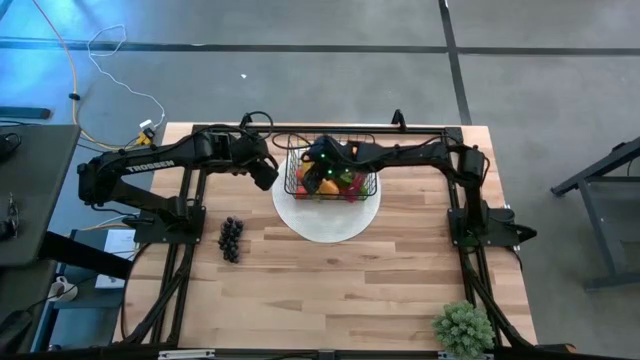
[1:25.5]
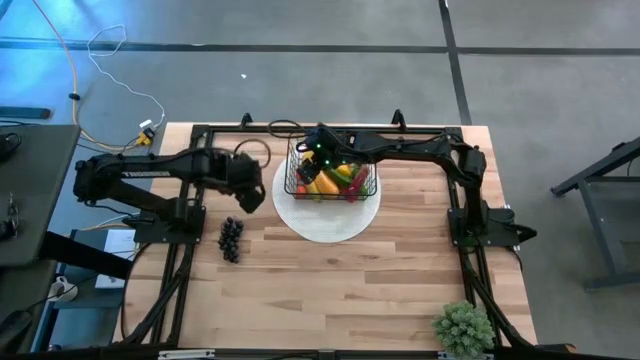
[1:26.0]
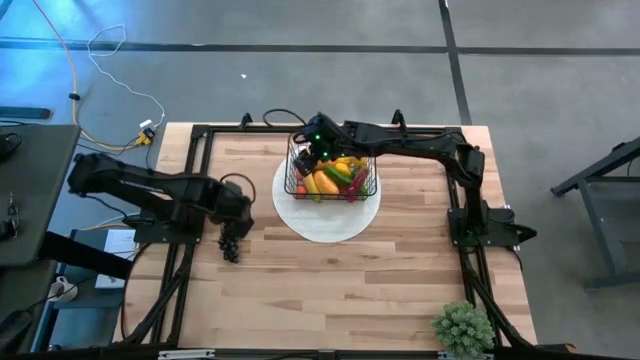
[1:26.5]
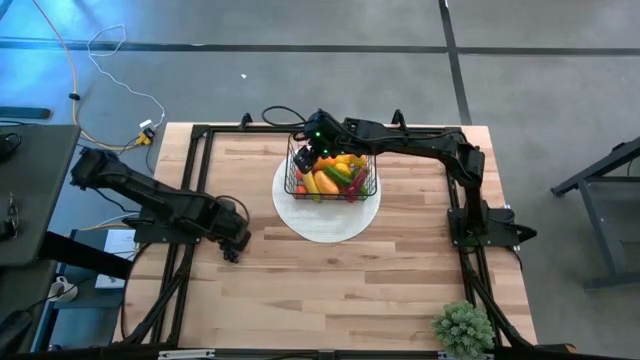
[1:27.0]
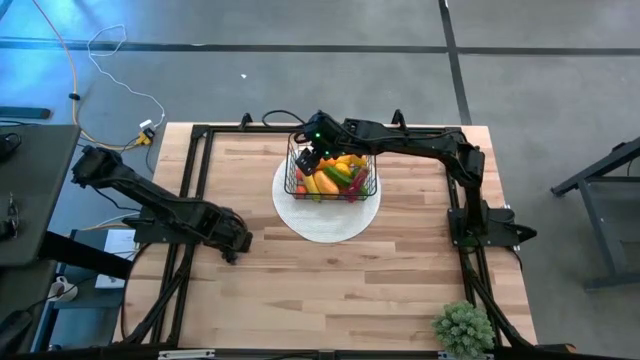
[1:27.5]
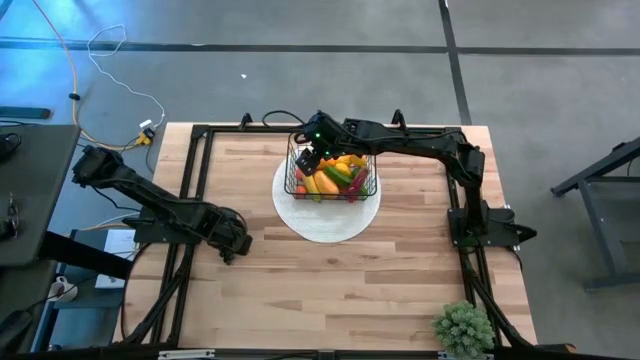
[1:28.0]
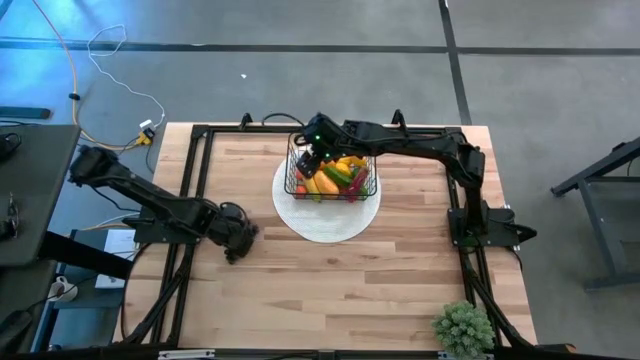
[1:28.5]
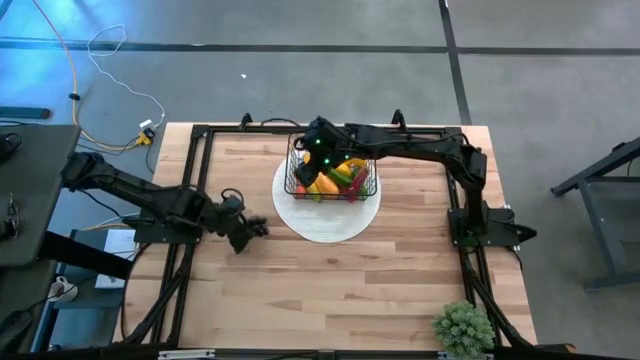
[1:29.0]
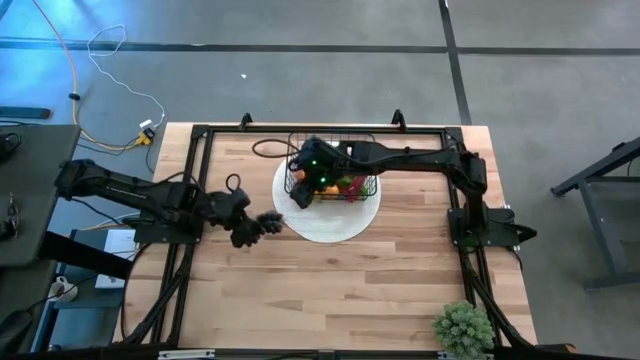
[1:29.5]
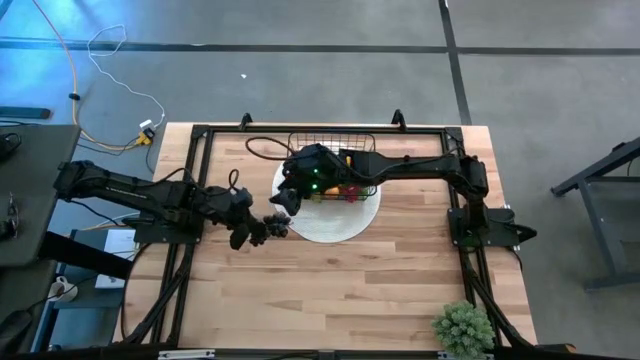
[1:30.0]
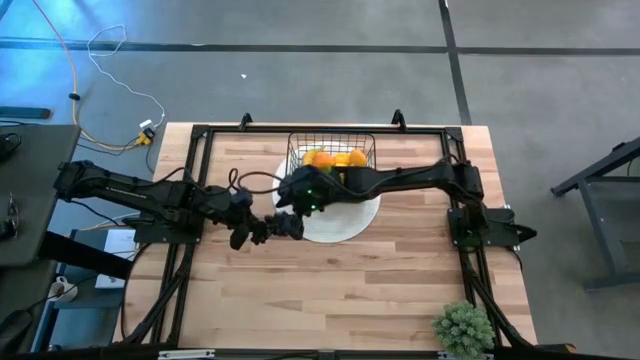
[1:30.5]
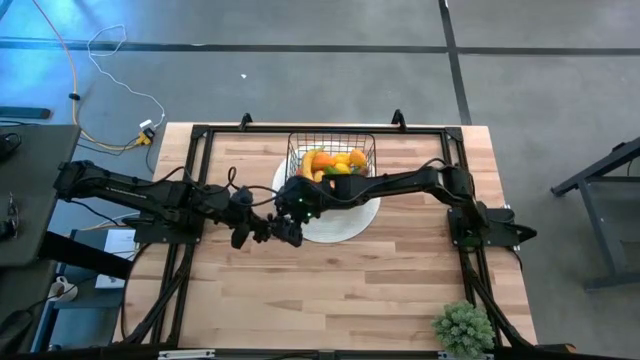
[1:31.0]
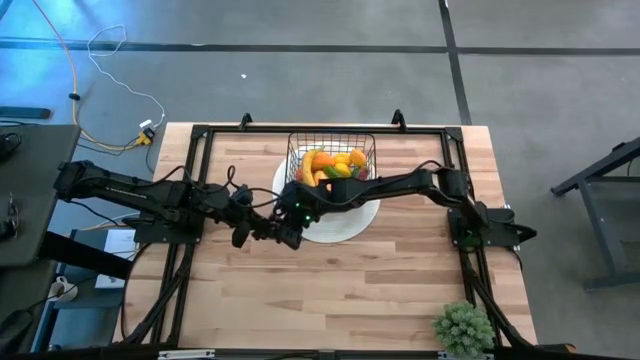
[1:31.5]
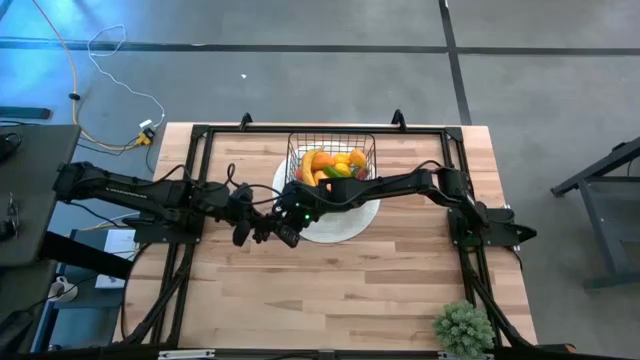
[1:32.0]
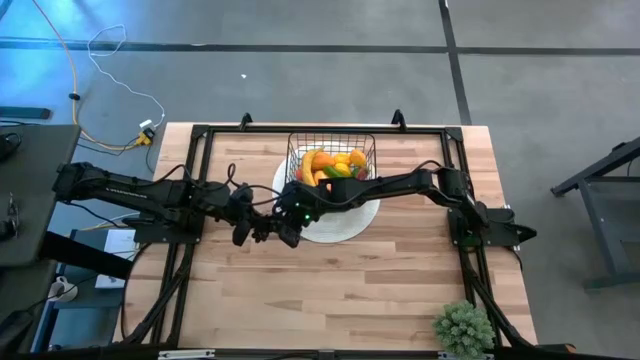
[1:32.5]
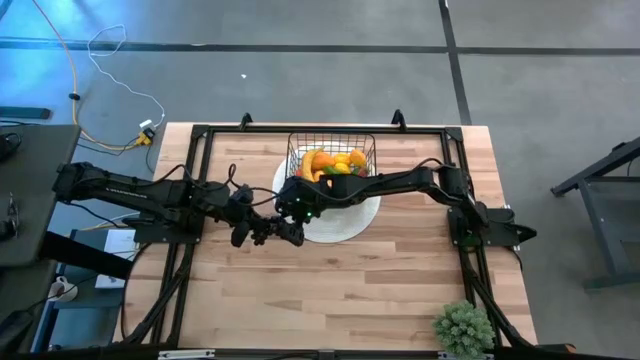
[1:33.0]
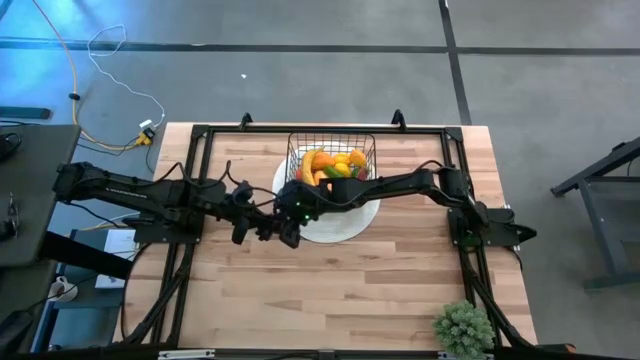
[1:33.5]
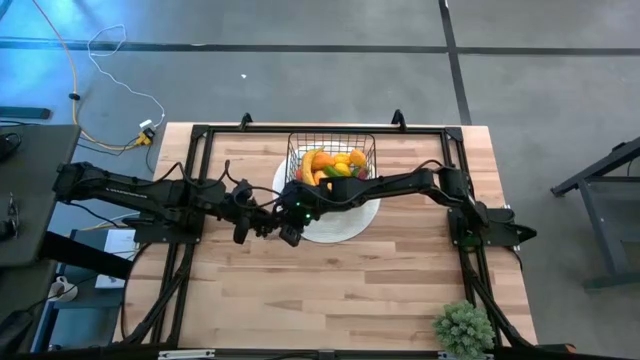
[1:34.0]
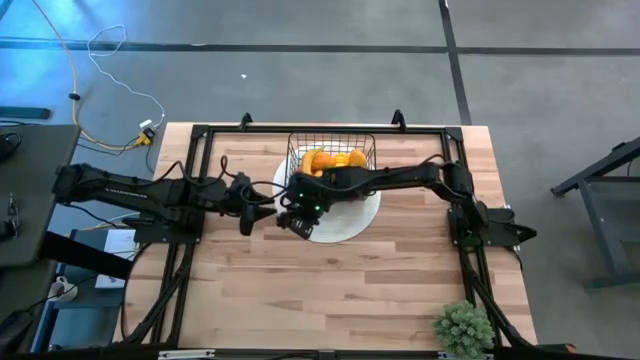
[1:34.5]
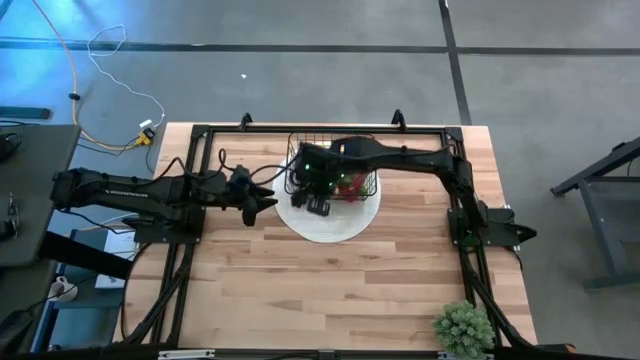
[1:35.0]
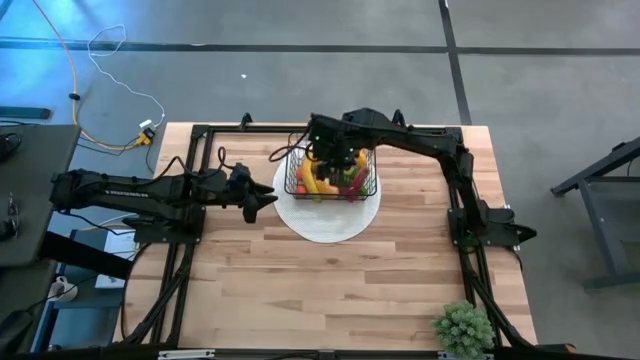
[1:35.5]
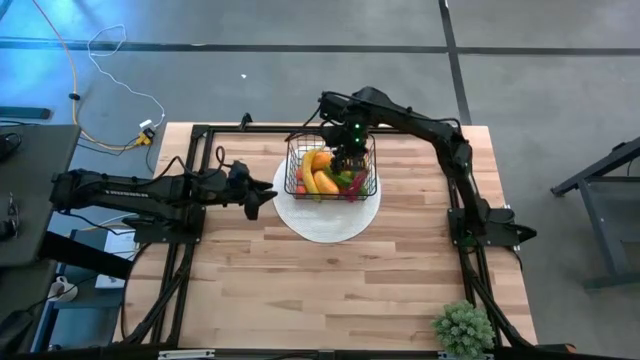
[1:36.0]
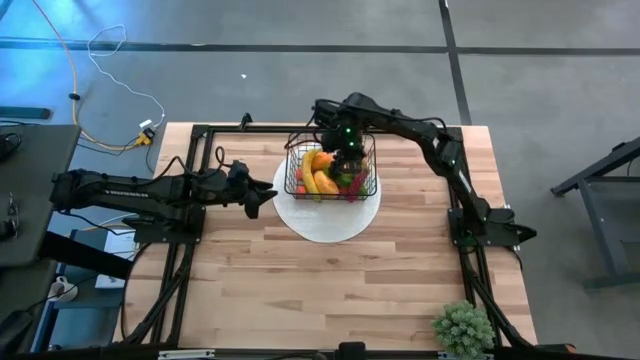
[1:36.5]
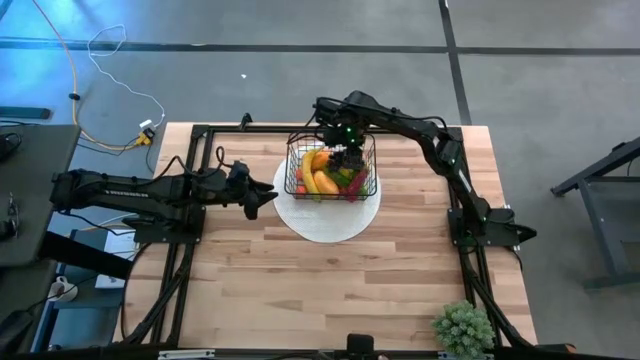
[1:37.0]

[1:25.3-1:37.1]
Task: Build produce basket
Put the black grapes into the black wire basket

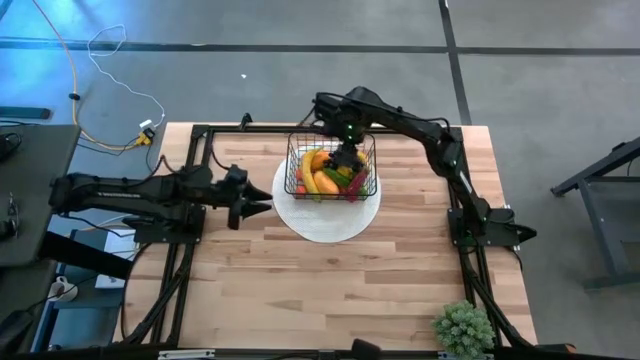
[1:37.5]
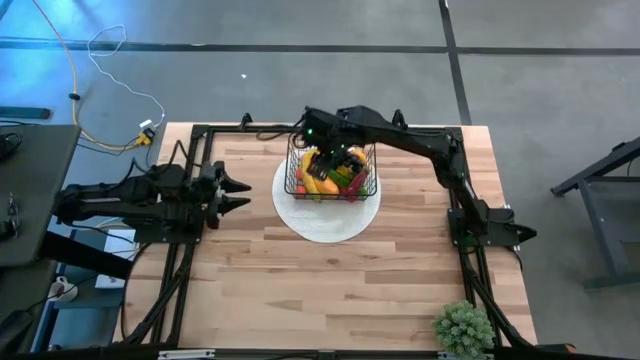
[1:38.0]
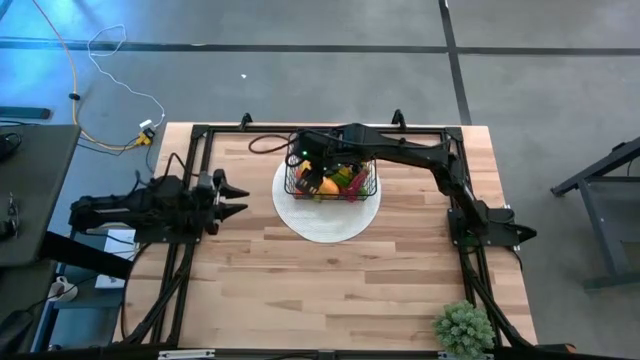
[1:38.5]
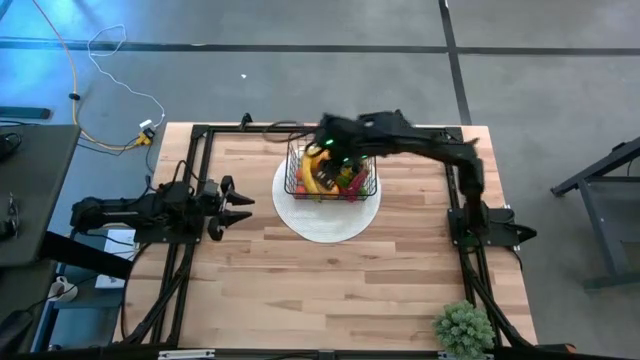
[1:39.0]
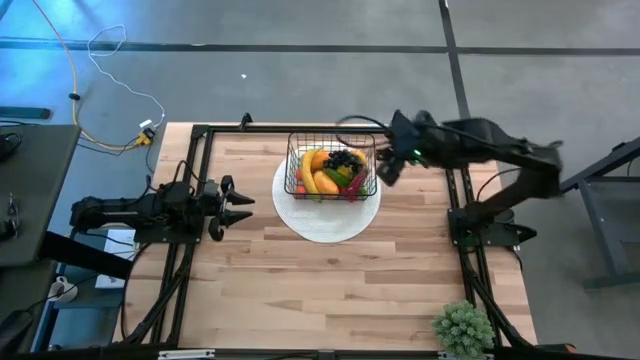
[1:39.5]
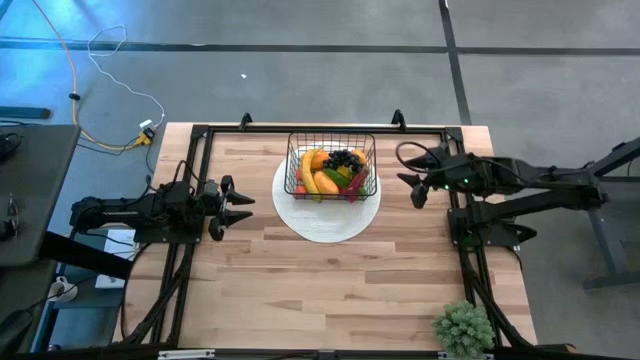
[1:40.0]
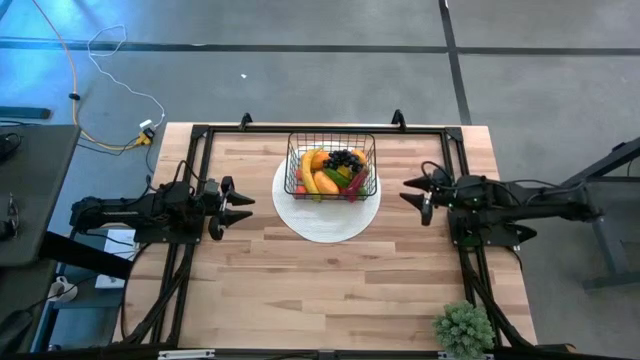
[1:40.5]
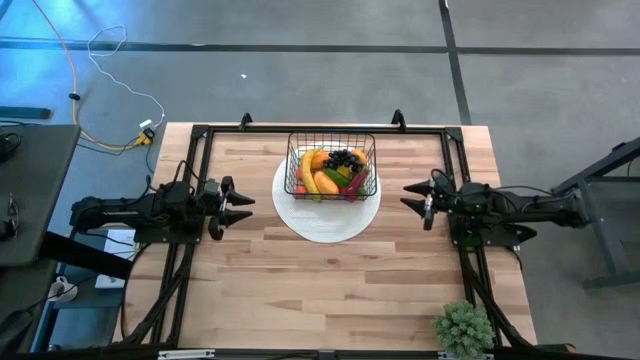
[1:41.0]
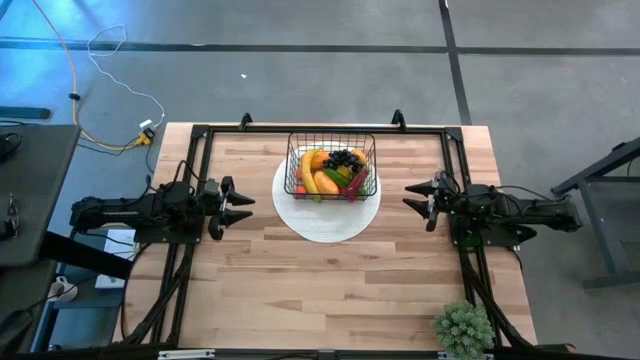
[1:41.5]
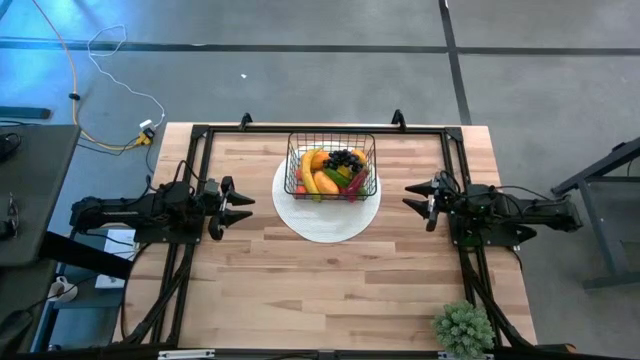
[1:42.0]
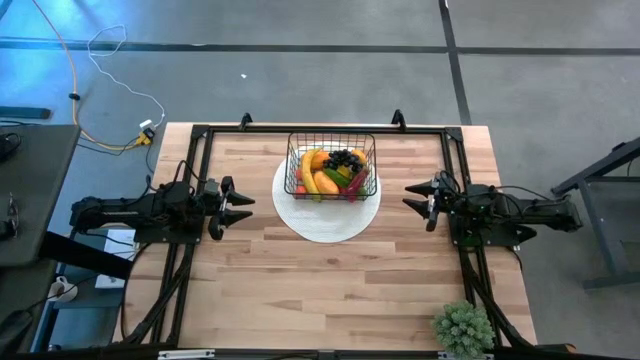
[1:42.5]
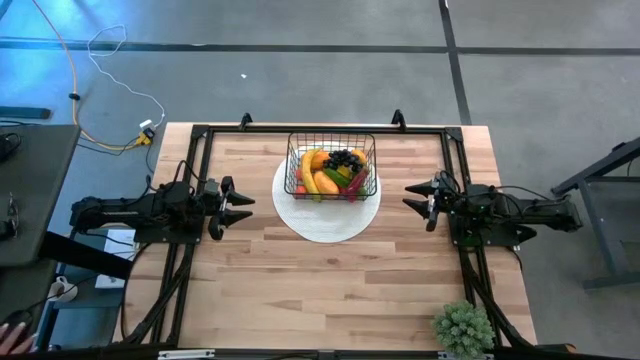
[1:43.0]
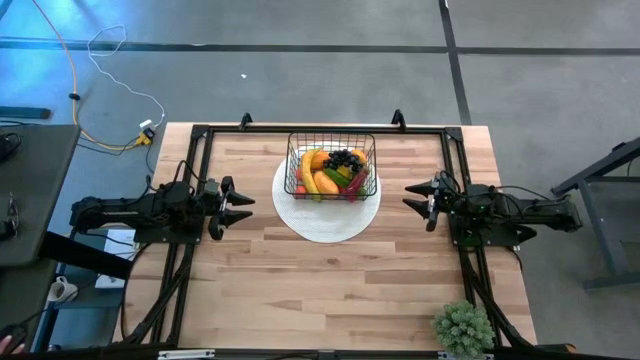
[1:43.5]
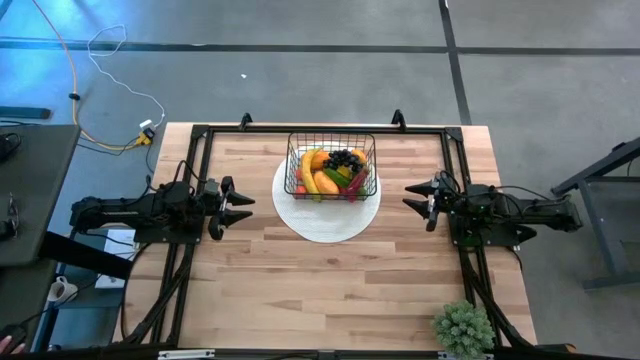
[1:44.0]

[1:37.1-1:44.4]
Return to Home Position

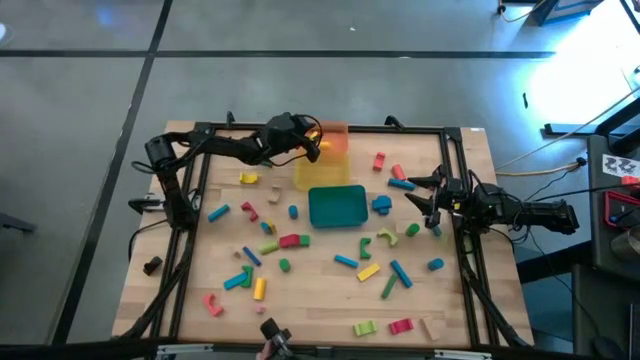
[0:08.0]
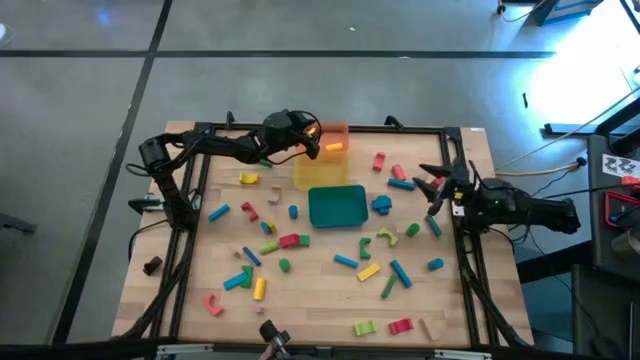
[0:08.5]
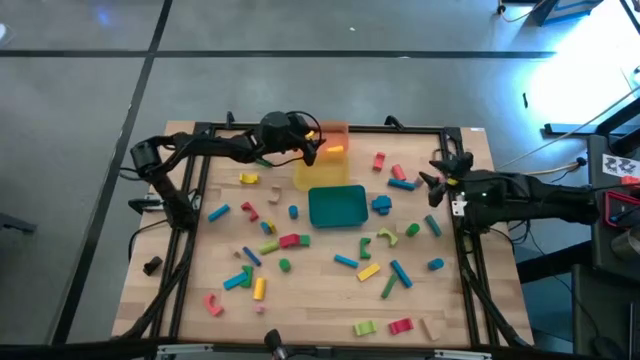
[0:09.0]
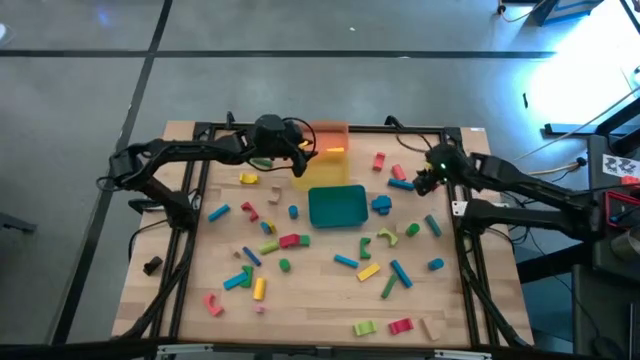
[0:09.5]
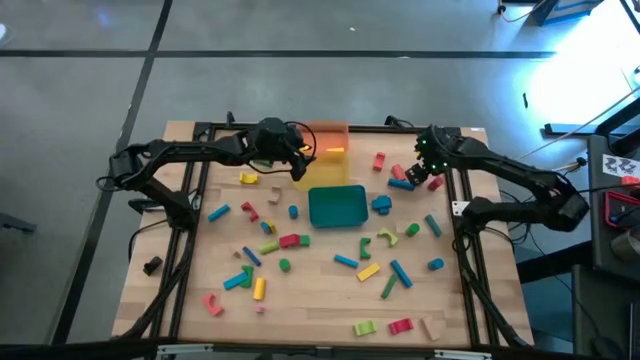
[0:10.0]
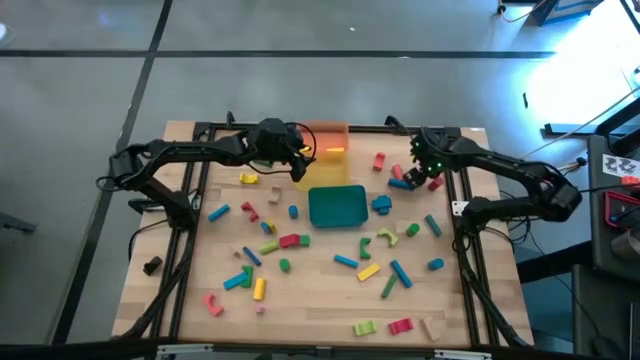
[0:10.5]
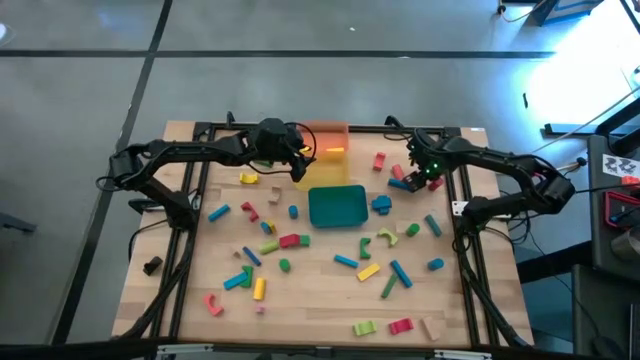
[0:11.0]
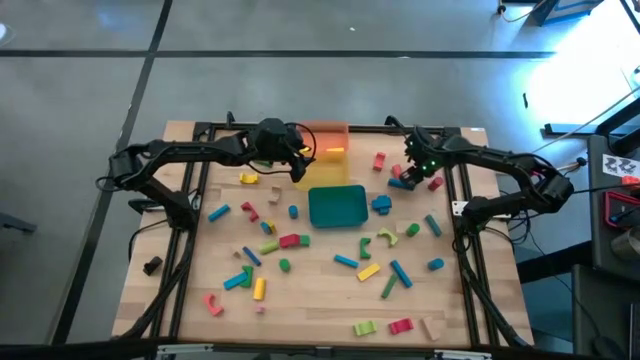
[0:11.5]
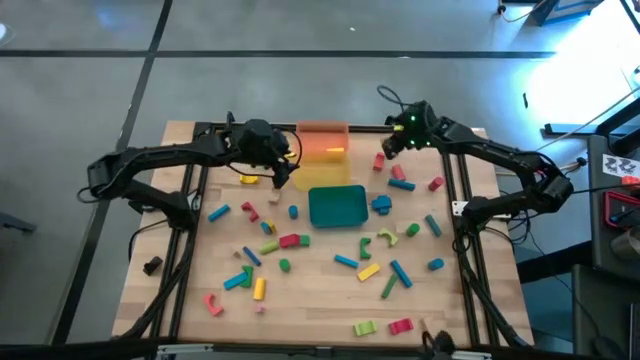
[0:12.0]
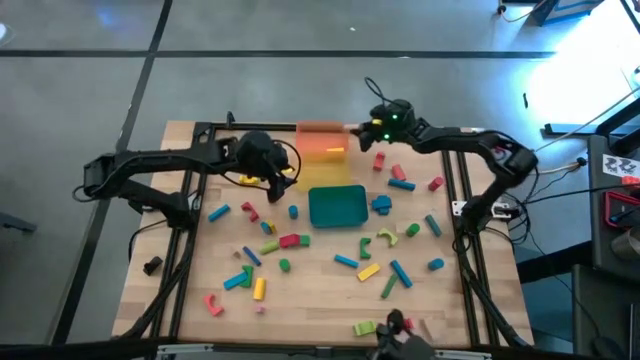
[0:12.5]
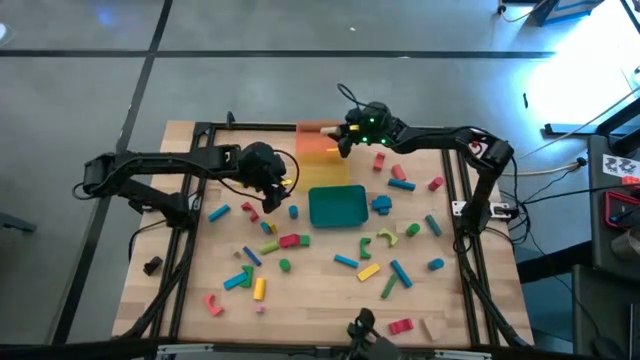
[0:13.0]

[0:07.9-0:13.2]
Task: Sort blocks by size
Put the brown cylinder block into the orange bin
